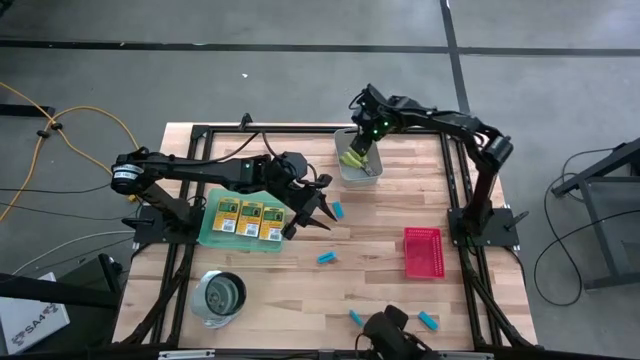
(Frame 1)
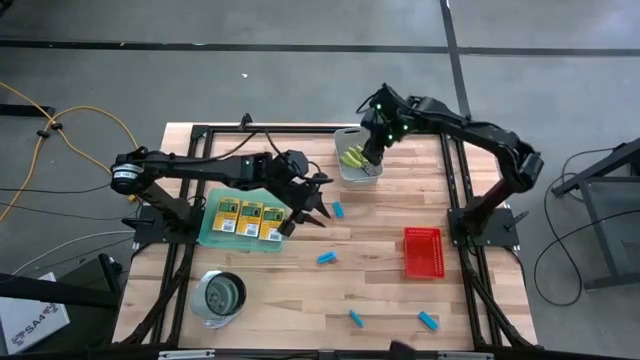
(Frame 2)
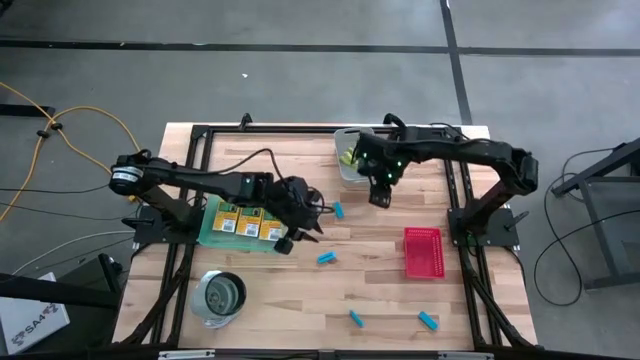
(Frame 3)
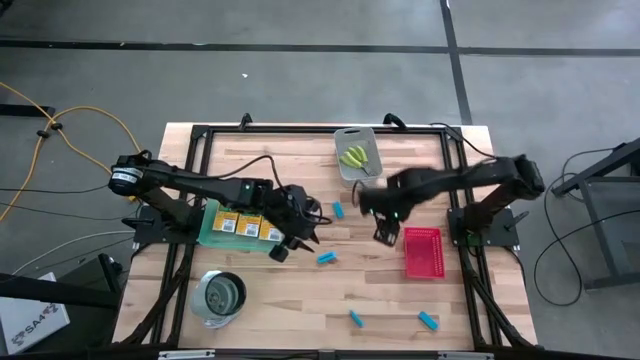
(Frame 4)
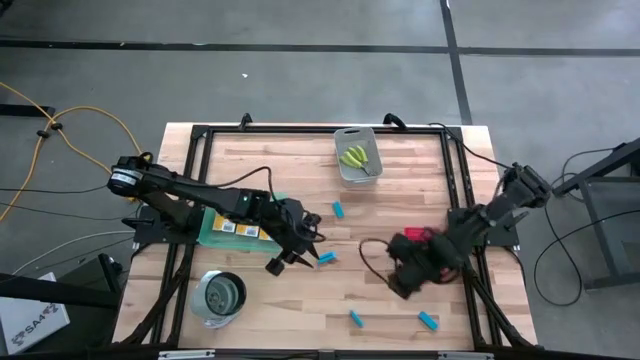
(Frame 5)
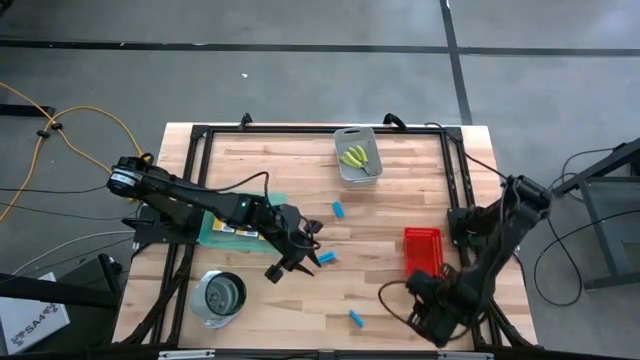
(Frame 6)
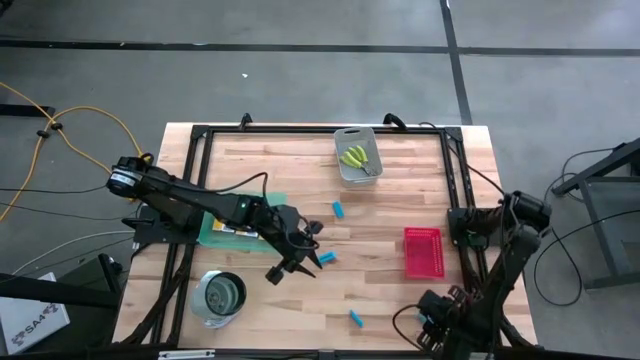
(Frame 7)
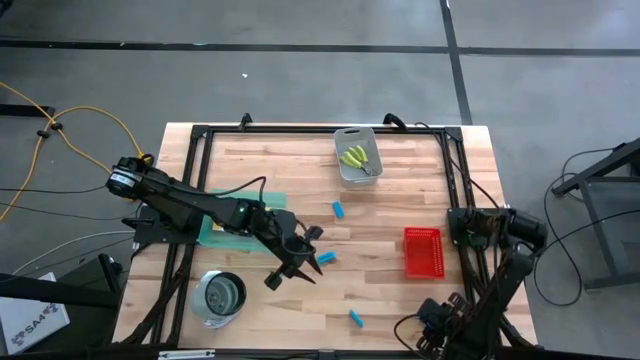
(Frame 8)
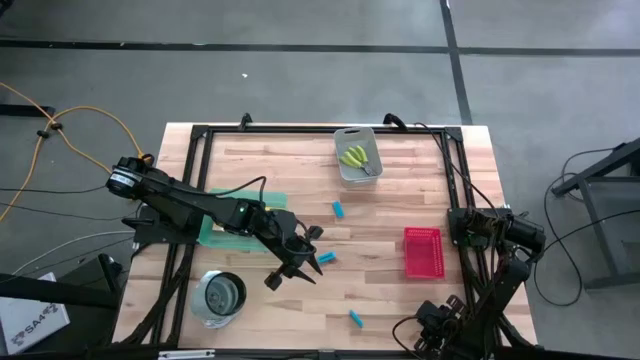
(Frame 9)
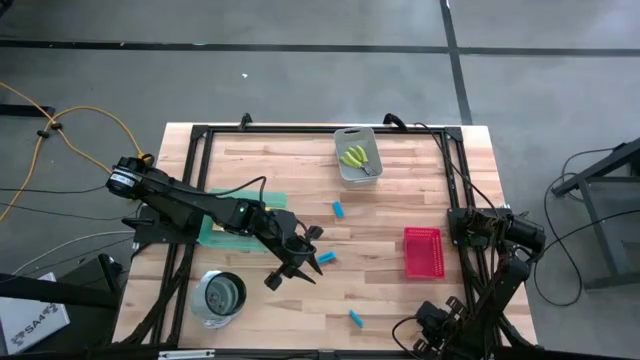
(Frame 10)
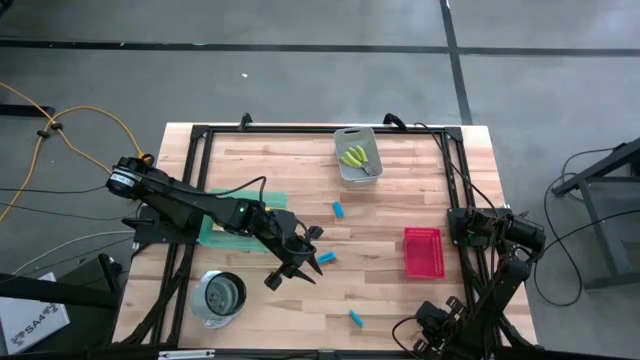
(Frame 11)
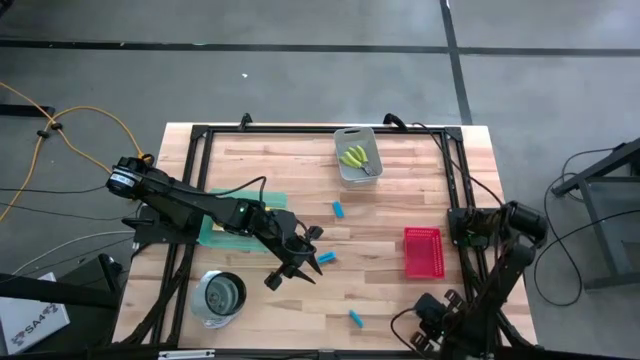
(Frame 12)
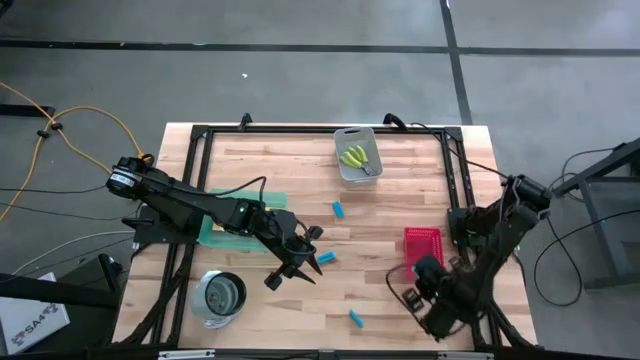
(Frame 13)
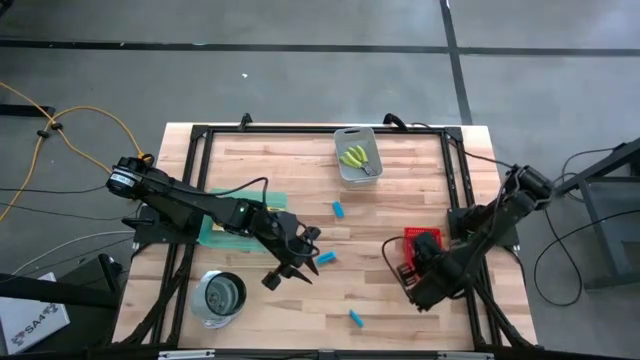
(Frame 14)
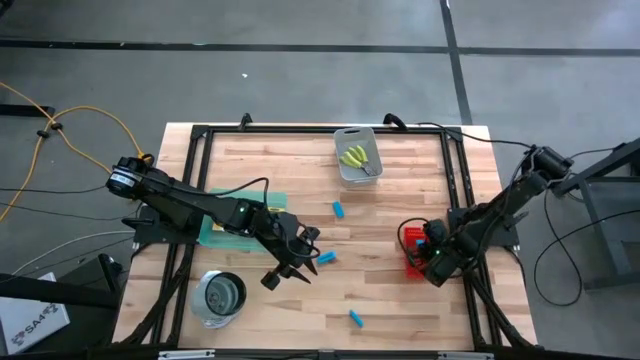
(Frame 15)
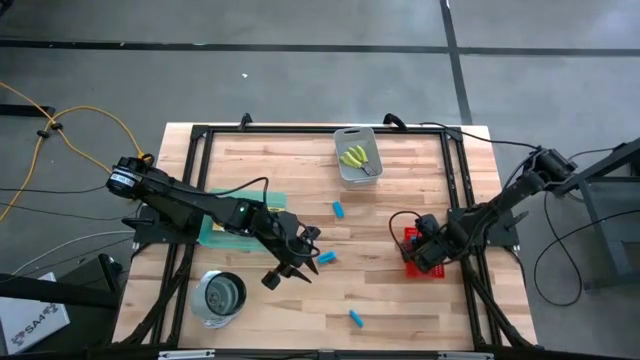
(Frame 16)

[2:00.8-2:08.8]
Task: Pick & Place School Supplies
Put the blue eraser into the red bin

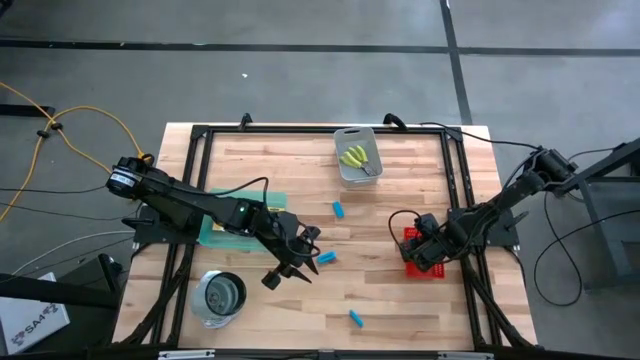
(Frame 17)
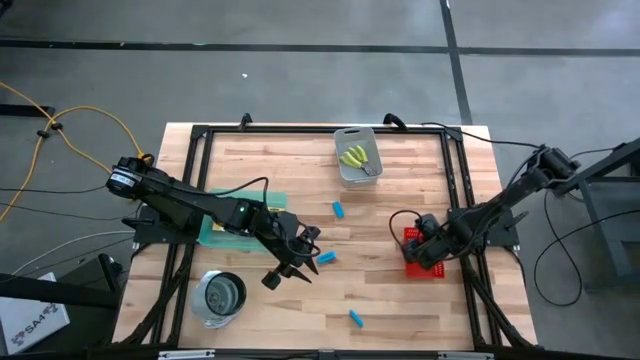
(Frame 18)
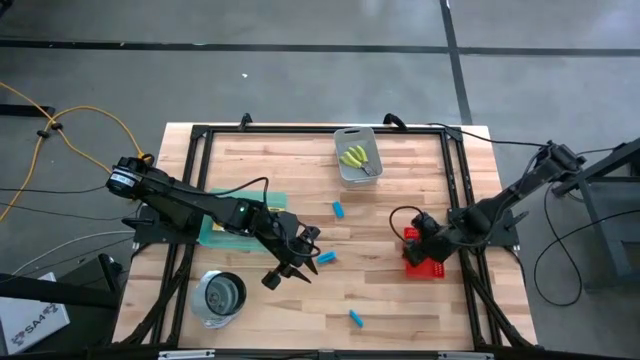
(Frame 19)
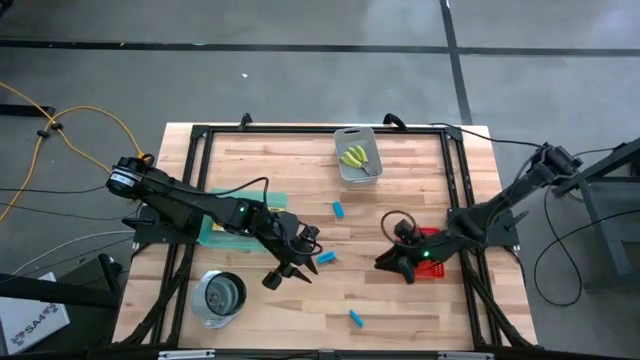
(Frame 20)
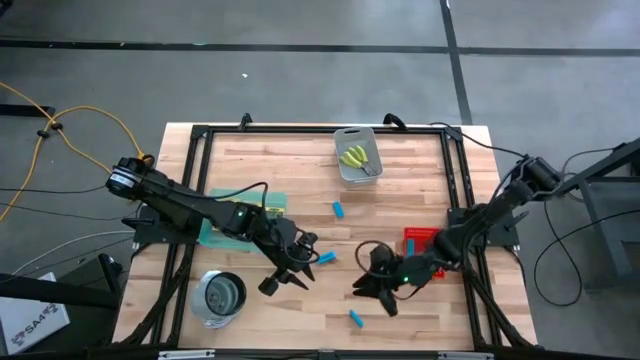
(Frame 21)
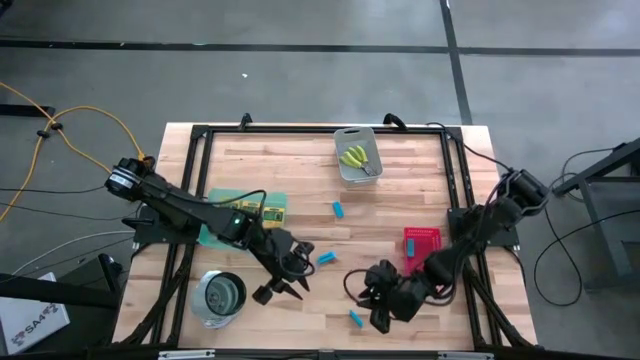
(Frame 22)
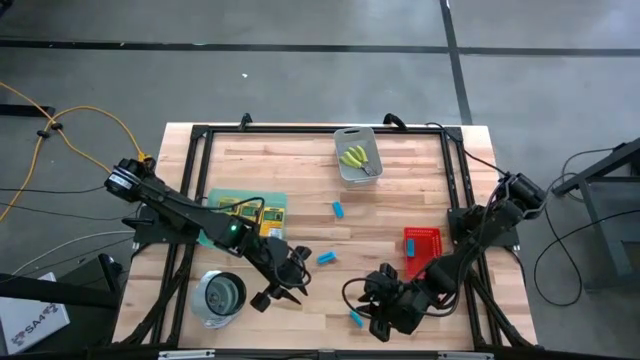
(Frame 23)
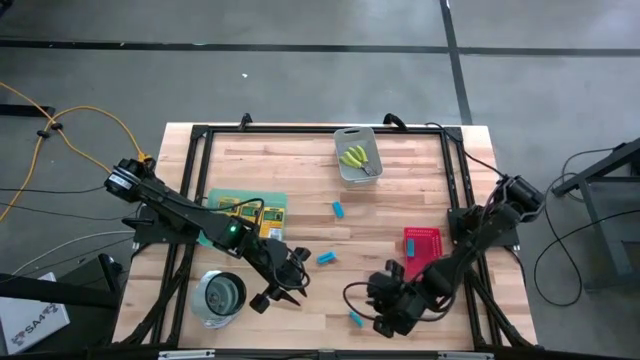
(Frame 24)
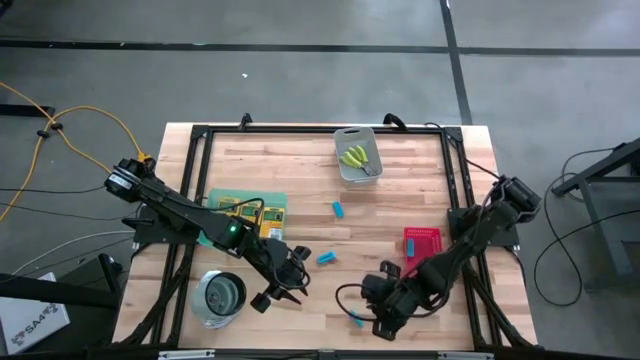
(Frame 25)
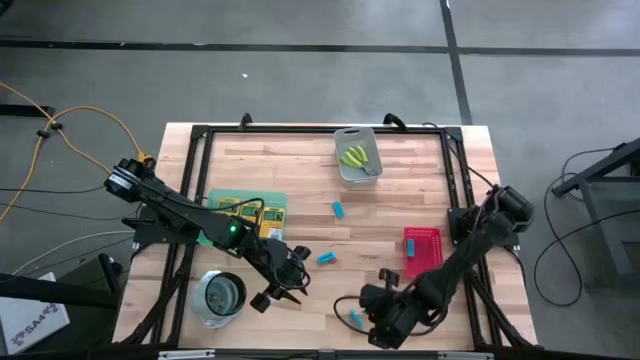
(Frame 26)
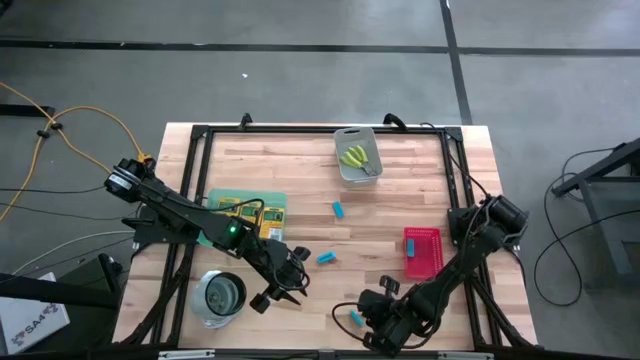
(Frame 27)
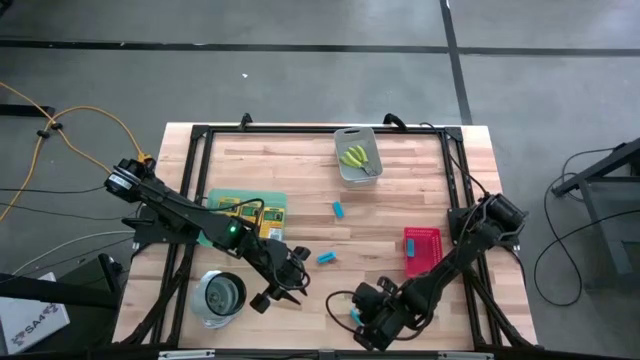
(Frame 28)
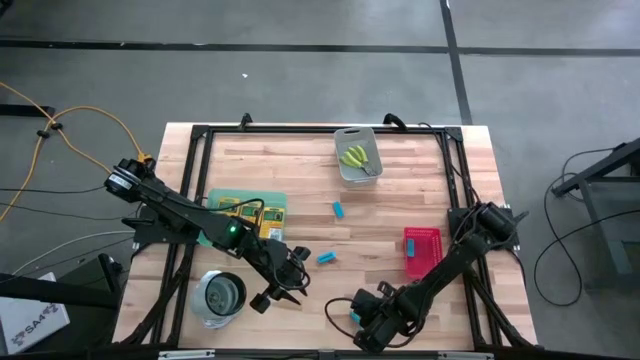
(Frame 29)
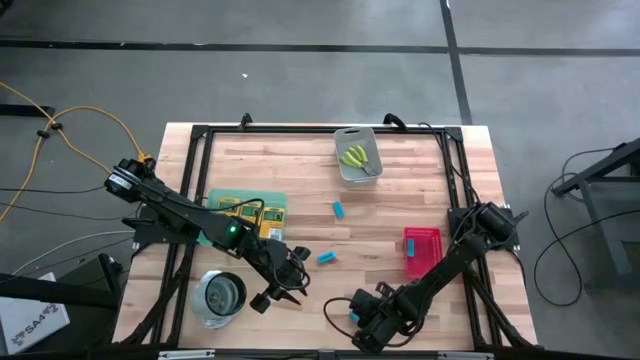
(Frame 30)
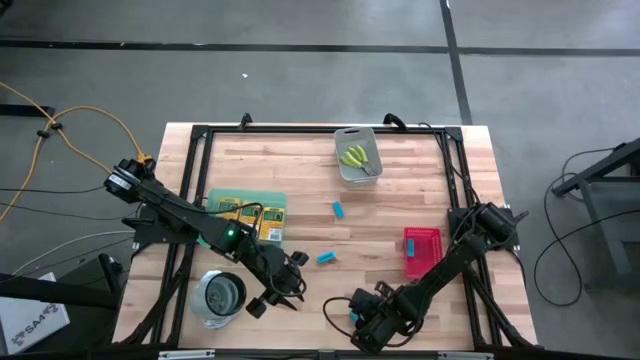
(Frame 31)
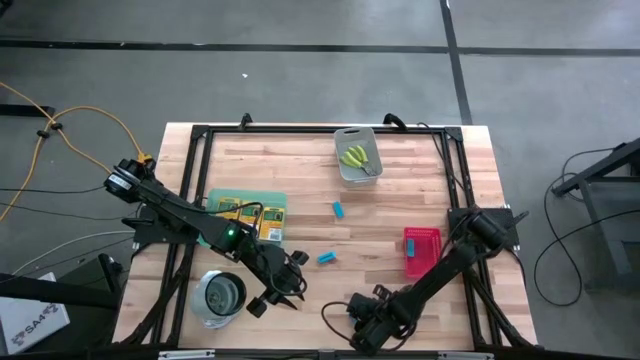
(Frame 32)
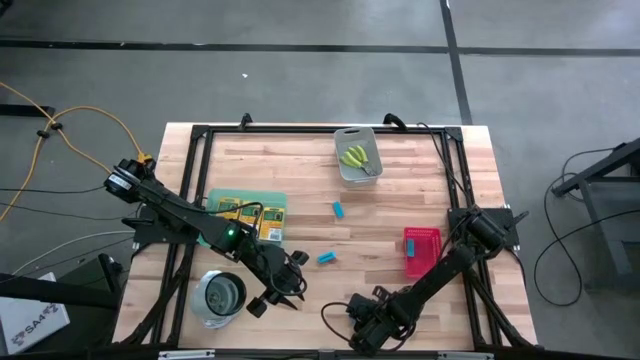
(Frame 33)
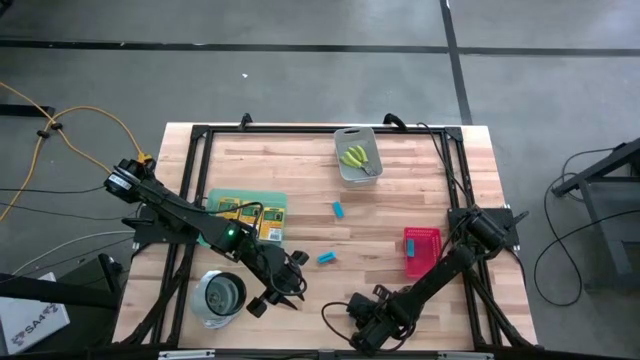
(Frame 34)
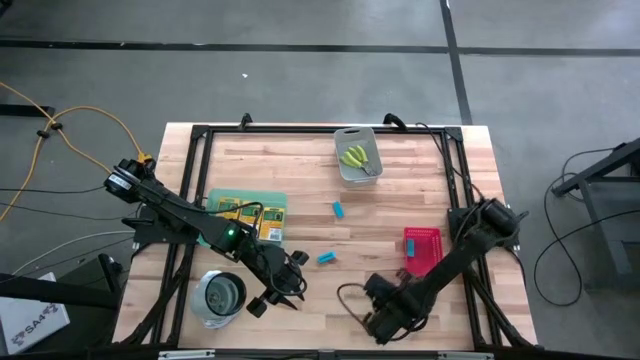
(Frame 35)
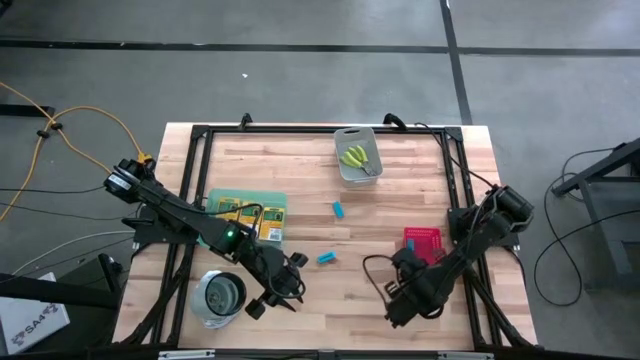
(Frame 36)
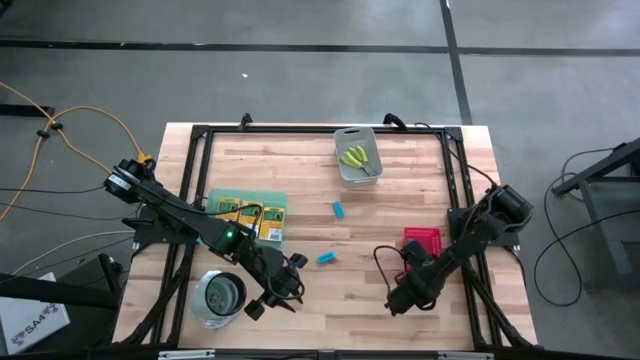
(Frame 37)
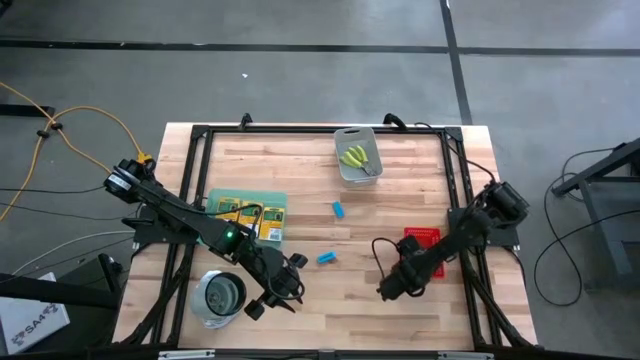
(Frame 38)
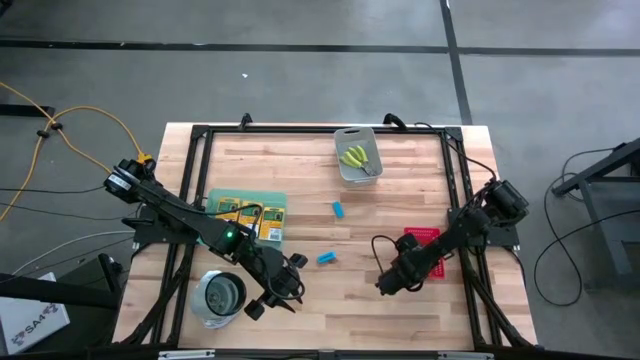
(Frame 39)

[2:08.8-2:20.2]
Put the blue eraser into the red bin

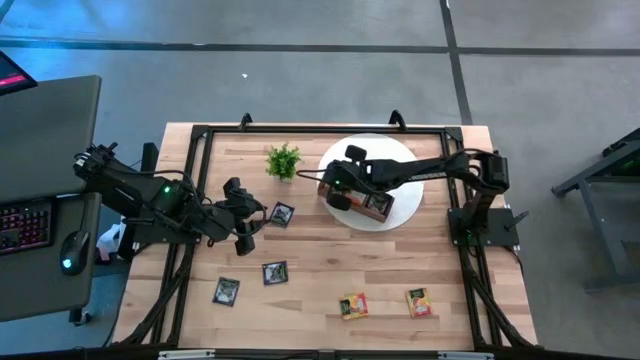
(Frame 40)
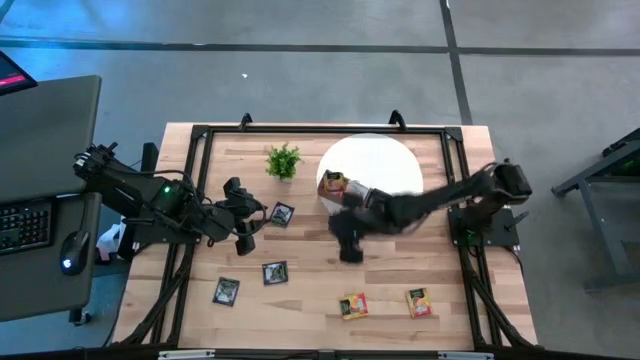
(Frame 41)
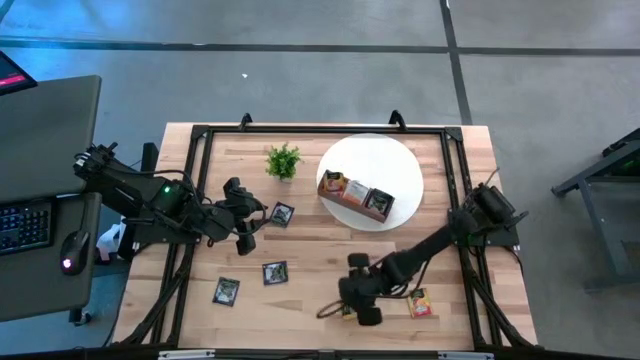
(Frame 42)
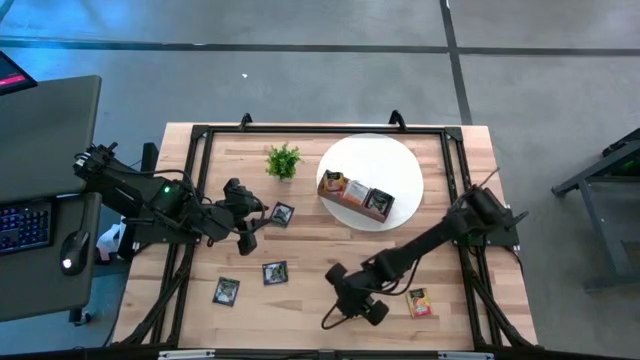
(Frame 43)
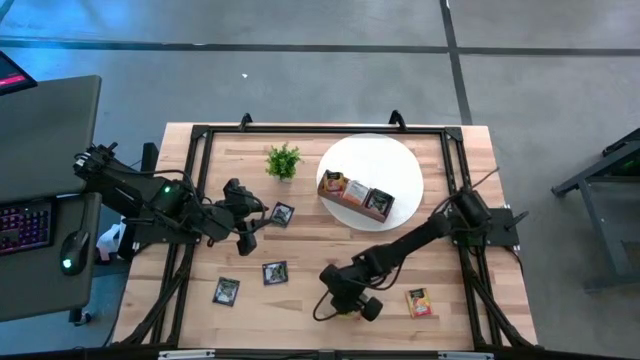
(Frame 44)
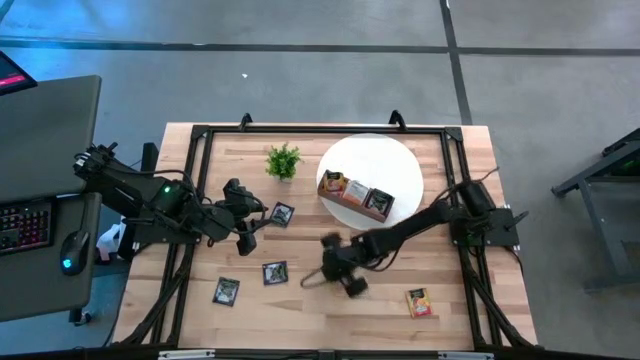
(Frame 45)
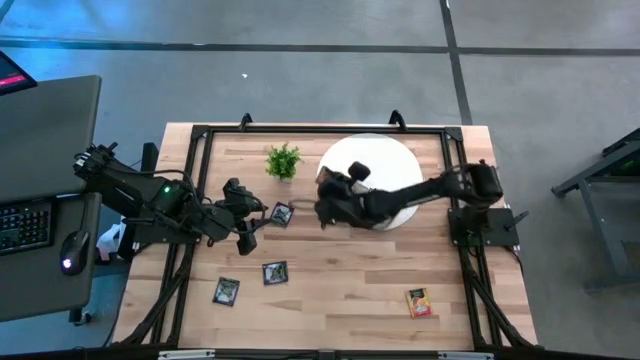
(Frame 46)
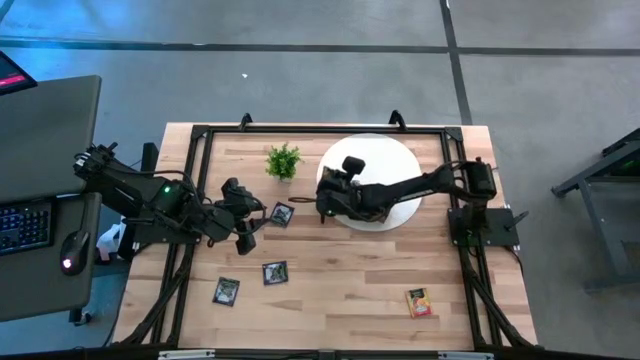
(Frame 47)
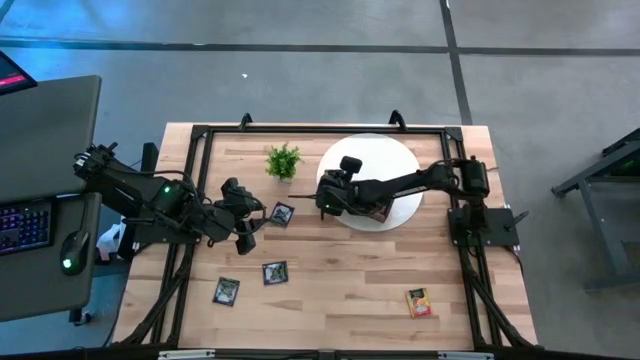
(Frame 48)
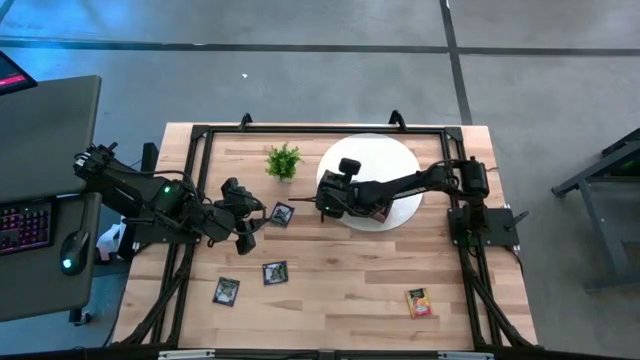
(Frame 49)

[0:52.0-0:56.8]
Task: Pick & Place Tea
Put the yellow tea bag into the left compartment of the wooden organizer
